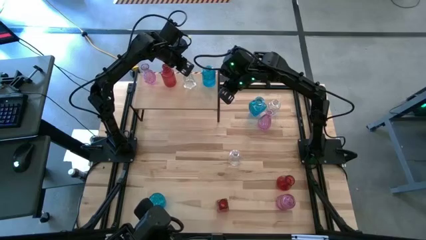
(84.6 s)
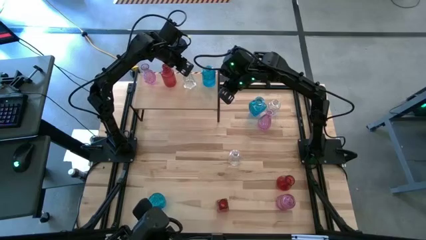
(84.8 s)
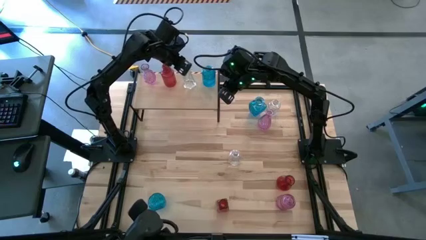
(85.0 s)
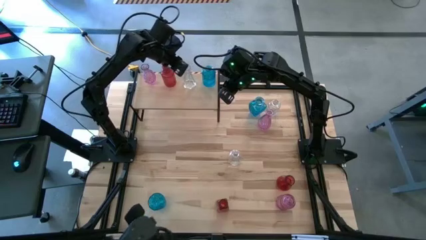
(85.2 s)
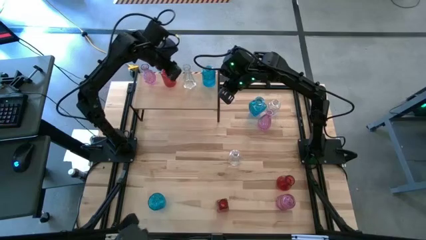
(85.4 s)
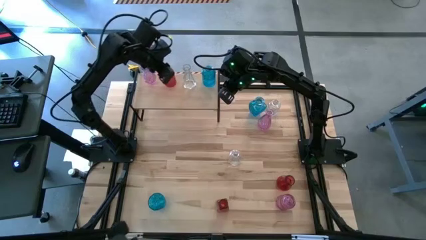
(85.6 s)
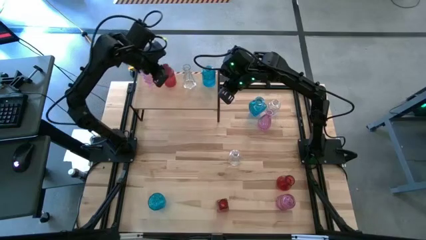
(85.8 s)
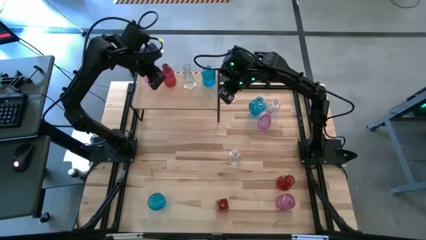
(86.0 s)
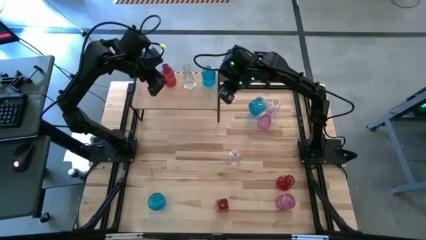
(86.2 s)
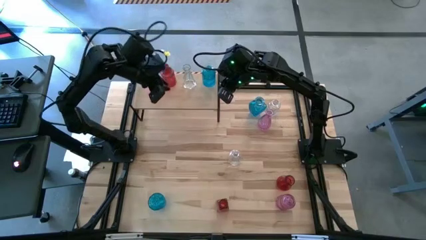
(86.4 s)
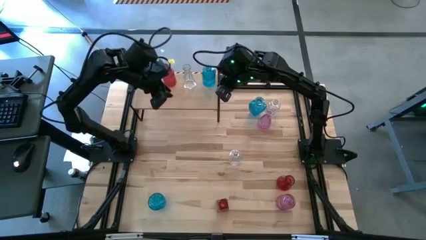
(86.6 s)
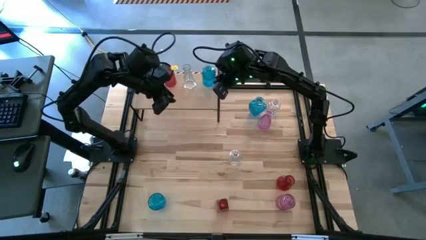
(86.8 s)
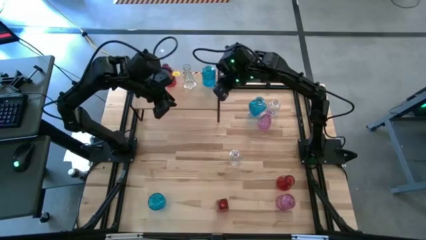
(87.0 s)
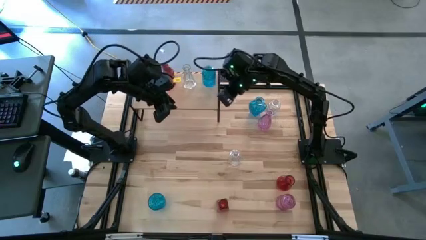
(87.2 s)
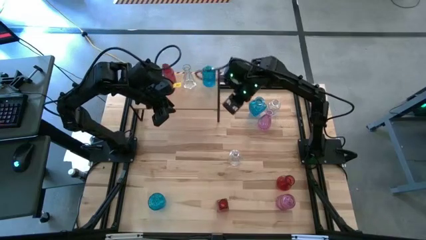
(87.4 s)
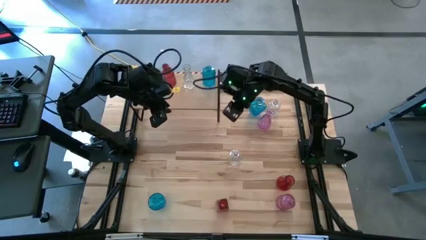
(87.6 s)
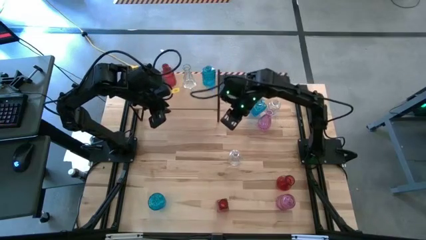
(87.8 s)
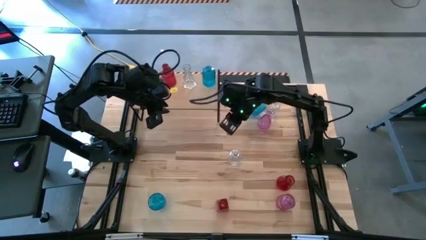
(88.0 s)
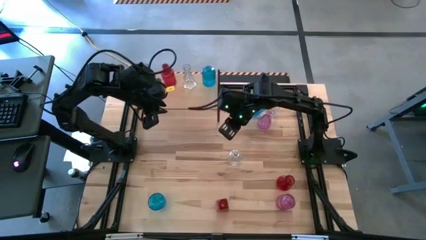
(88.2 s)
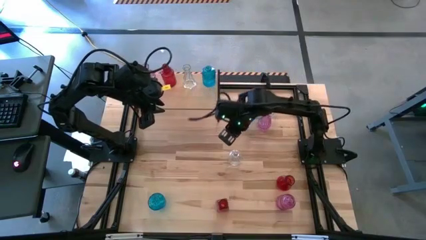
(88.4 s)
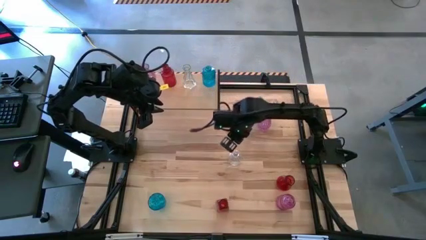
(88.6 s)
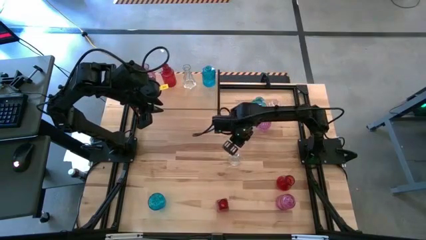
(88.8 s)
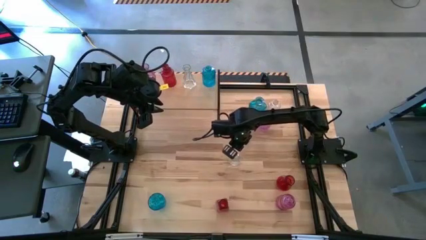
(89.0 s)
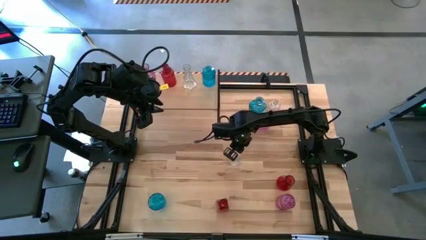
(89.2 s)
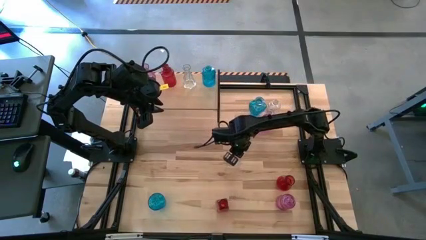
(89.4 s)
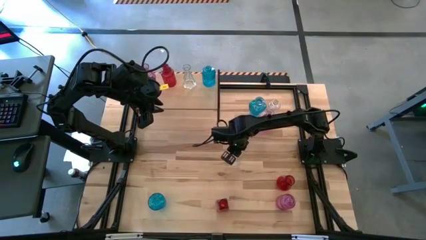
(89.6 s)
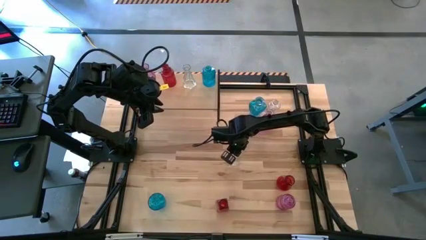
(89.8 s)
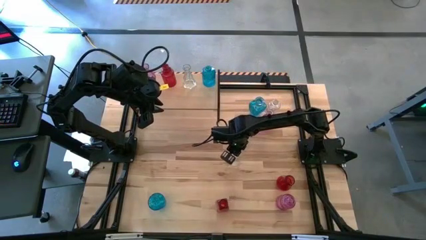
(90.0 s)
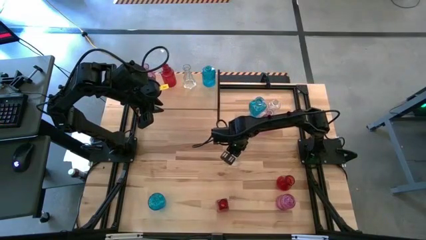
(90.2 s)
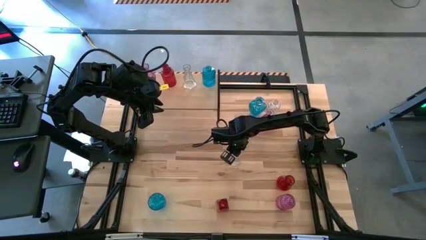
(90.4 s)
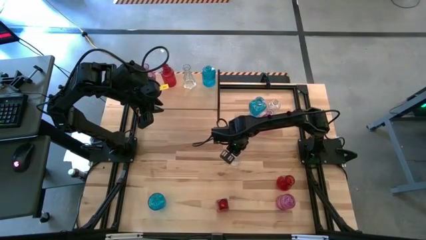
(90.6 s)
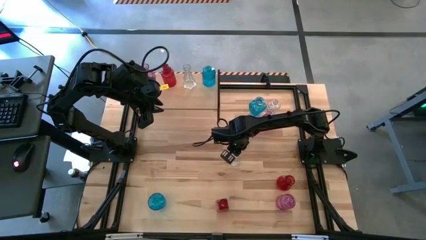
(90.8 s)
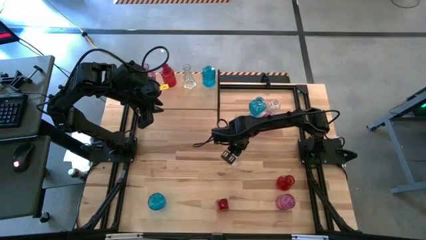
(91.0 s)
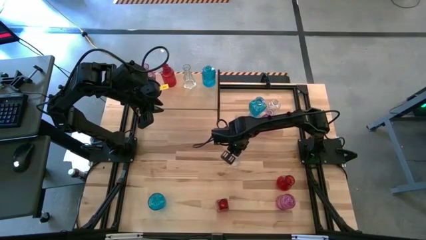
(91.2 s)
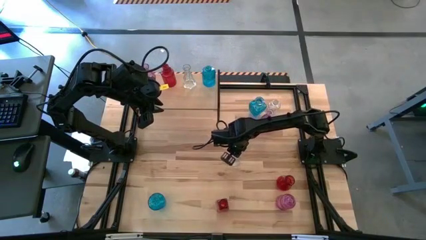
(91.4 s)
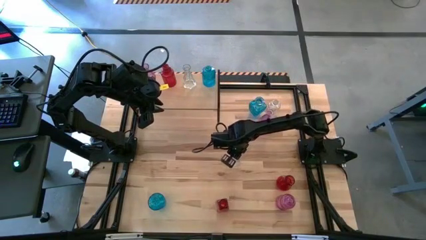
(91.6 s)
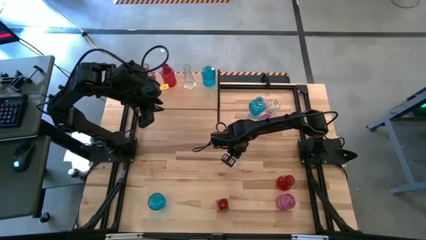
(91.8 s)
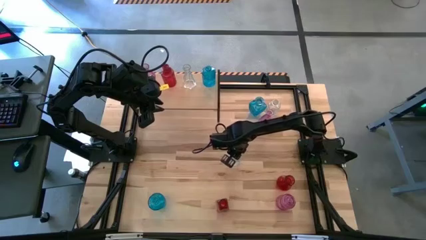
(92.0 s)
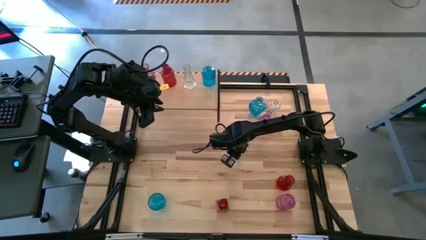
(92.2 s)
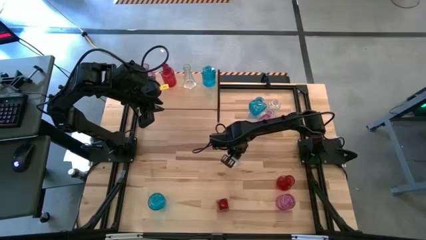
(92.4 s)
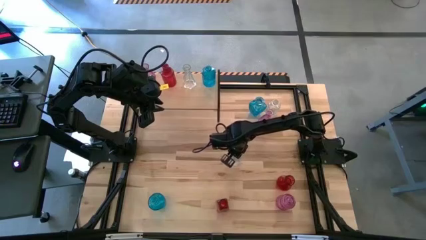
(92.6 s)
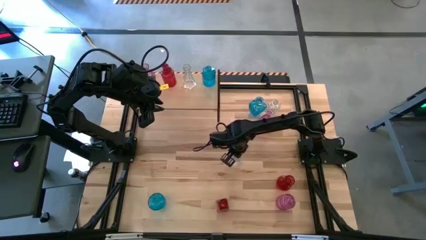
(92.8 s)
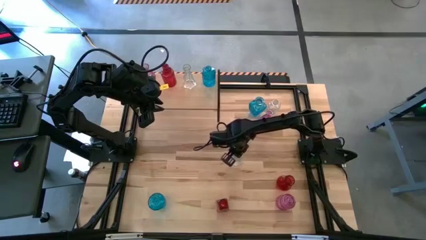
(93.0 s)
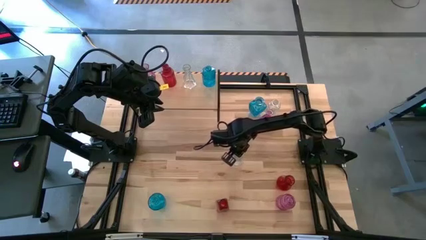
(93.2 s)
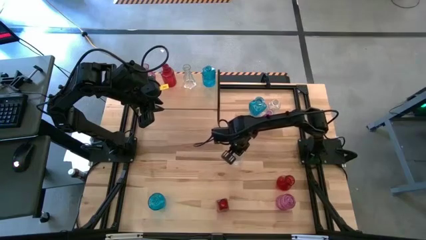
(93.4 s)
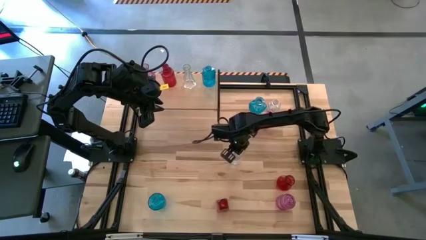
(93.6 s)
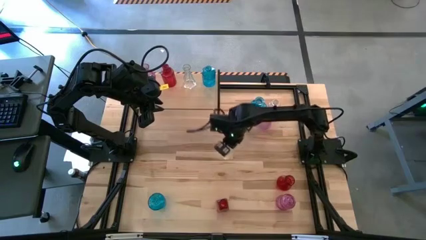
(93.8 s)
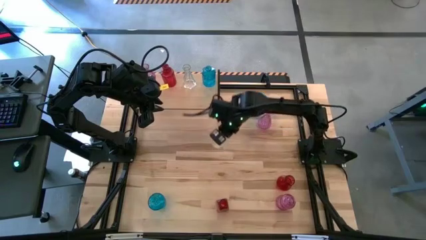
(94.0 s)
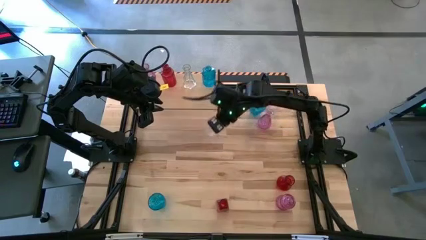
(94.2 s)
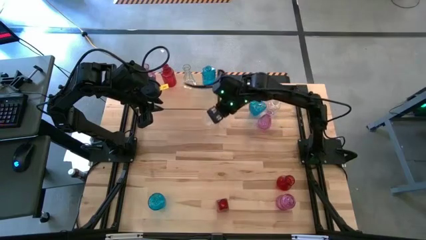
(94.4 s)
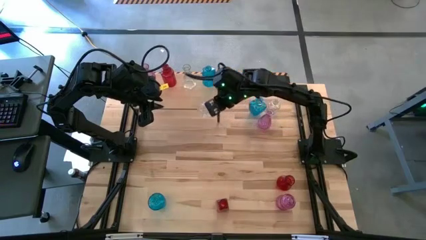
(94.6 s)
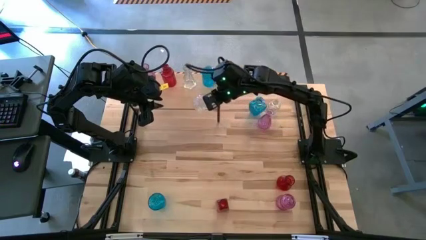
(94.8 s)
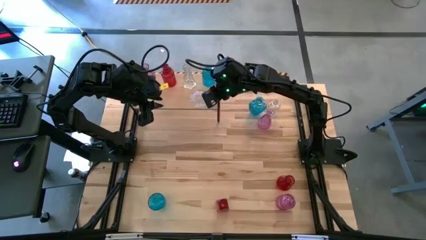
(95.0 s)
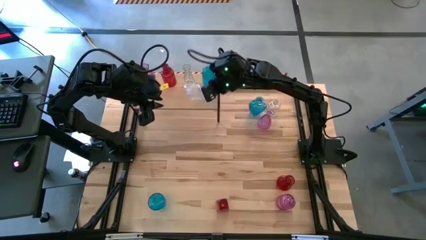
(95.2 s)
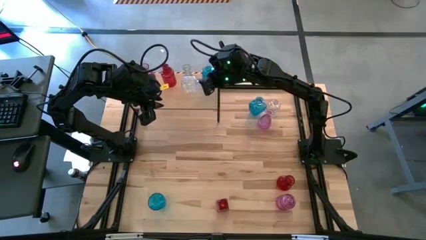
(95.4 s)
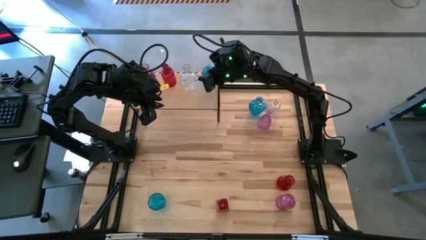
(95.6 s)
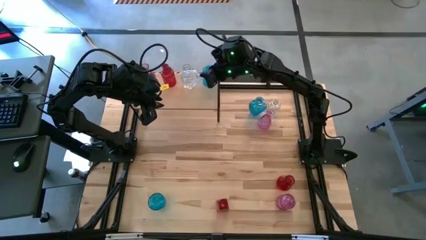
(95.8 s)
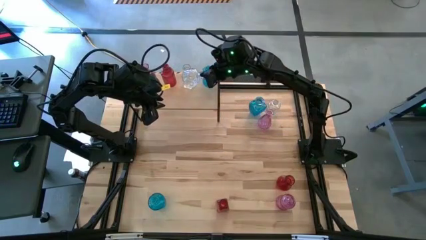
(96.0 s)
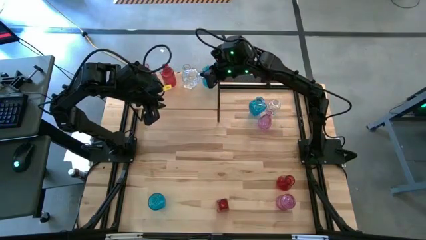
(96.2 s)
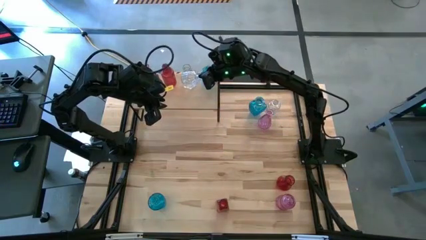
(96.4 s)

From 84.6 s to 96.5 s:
Task: sort vases onto shelf
Put the bottom transparent vase on the shelf aligned with the other transparent vase

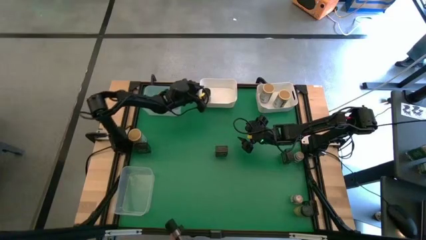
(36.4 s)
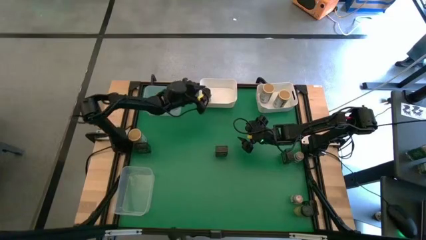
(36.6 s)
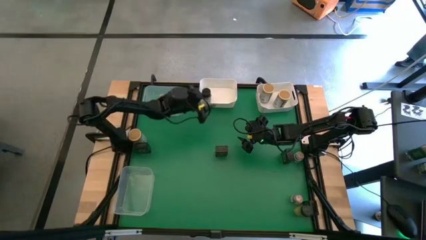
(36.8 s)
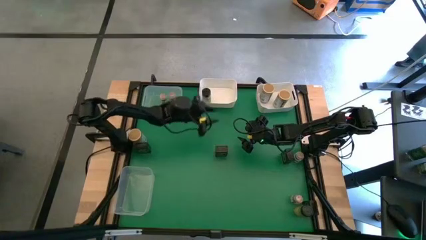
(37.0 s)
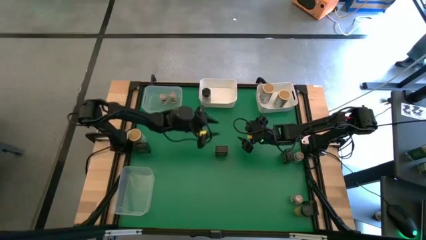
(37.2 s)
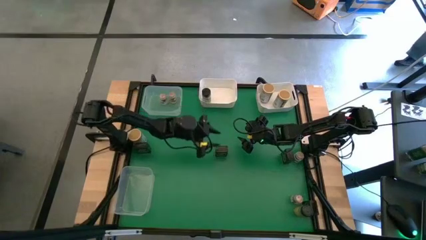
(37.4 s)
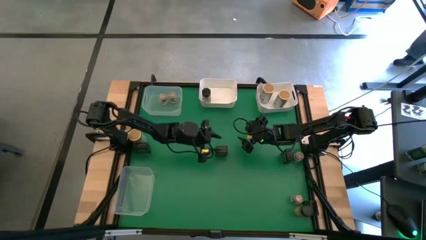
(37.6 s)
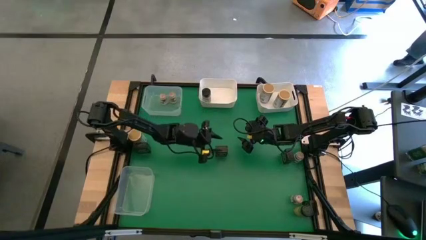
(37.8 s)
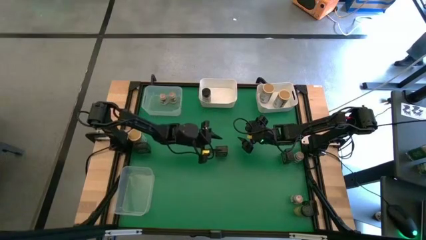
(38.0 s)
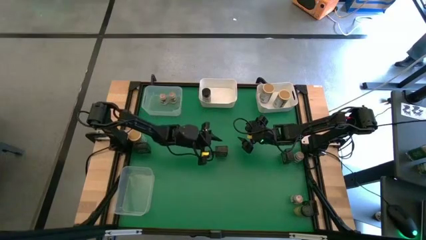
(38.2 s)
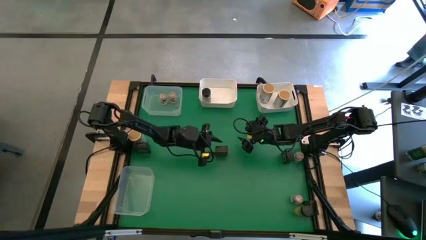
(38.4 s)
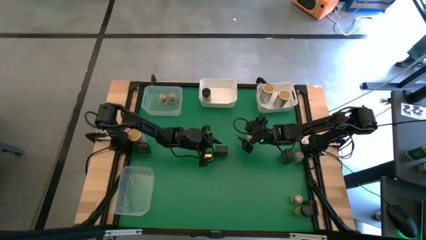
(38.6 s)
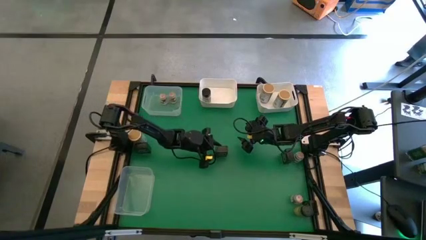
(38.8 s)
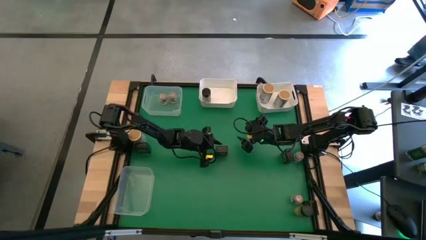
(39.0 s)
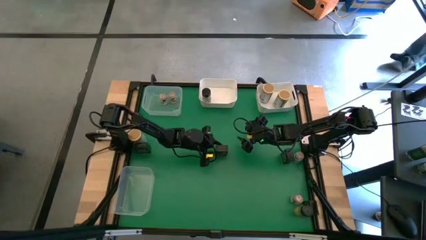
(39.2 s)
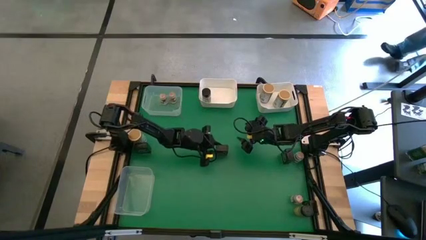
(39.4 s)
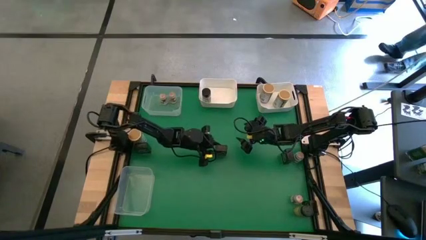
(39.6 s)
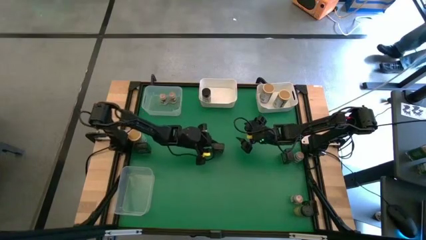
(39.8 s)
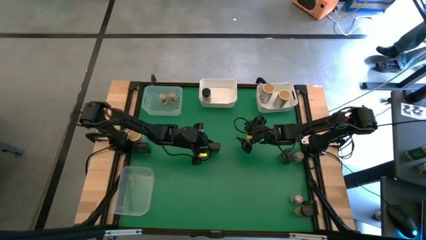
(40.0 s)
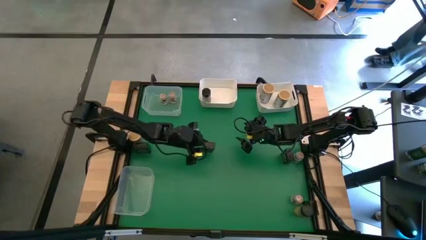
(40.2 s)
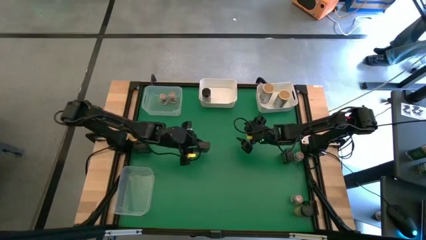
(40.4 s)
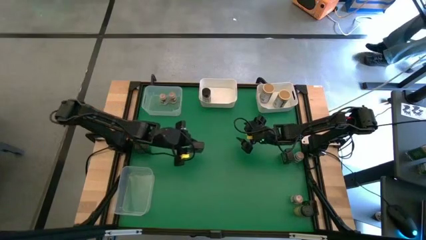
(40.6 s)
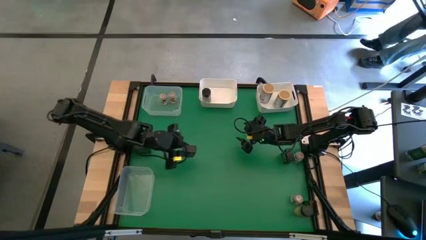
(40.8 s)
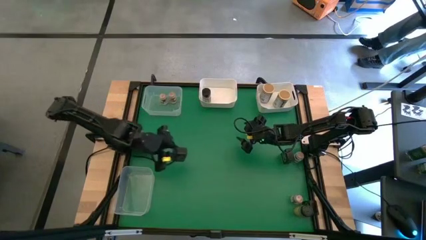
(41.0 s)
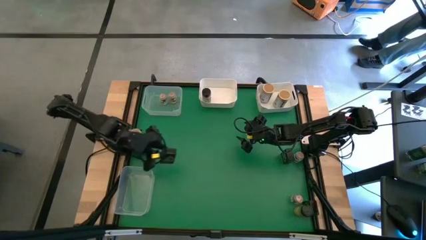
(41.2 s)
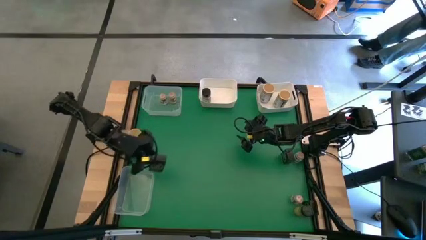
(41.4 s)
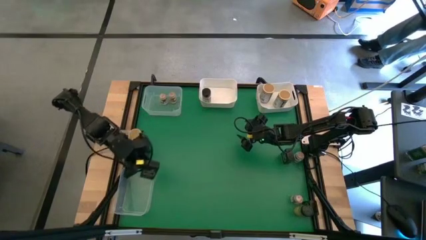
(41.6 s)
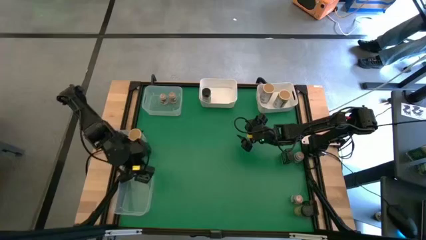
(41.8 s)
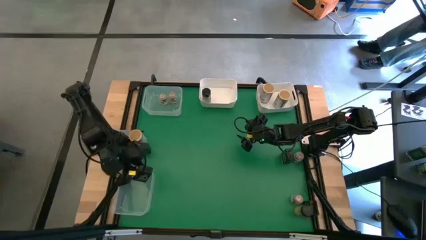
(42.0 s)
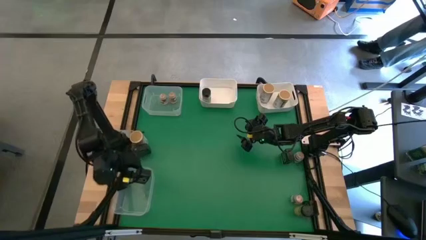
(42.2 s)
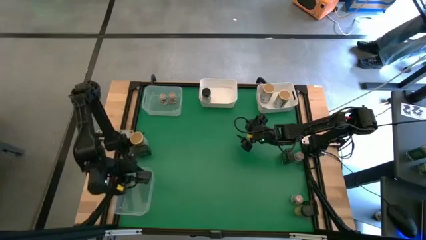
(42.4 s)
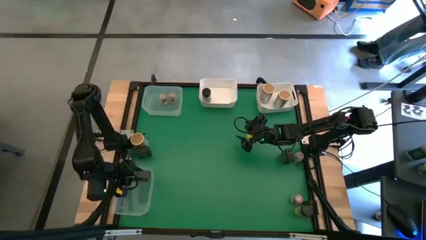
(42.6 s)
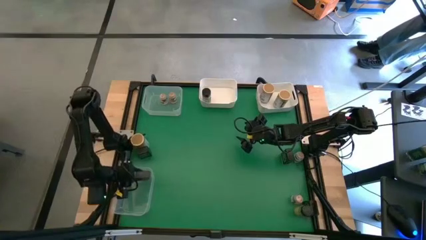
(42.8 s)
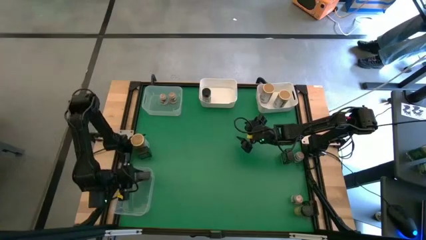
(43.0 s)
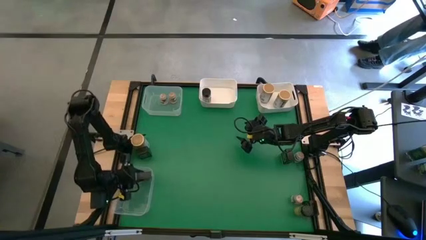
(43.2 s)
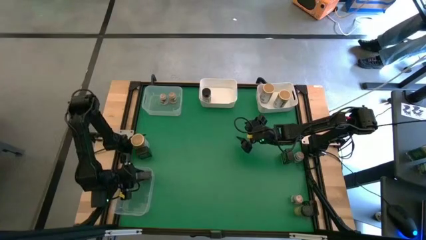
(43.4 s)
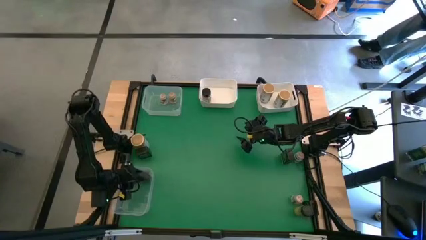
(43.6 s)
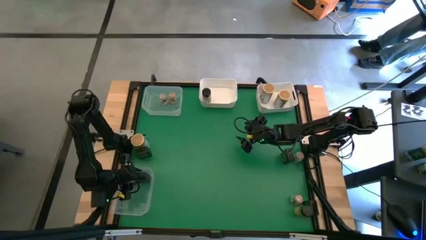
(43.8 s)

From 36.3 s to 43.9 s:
Task: Sort spices by type
Put the middle black seasoning can into the bottom transparent bin
